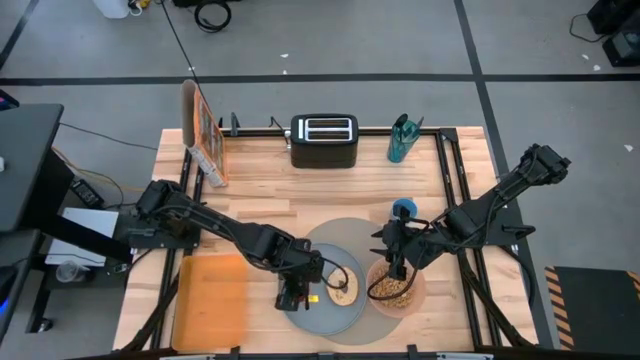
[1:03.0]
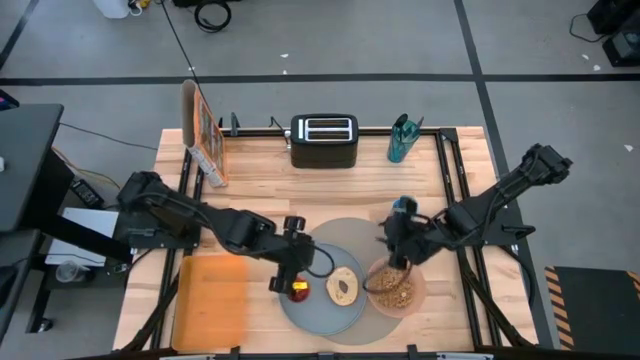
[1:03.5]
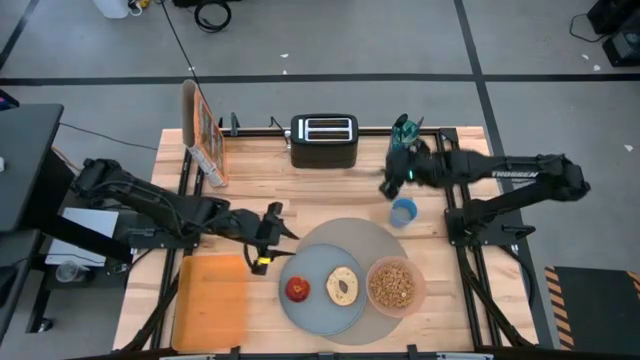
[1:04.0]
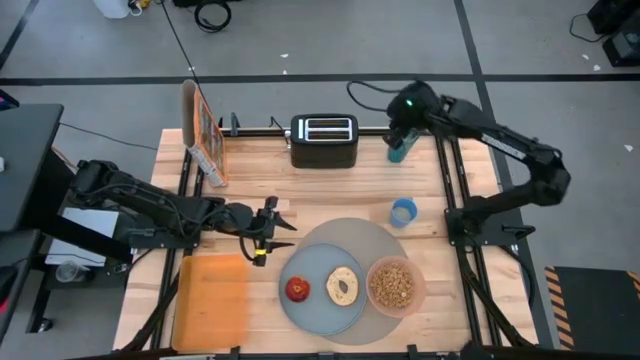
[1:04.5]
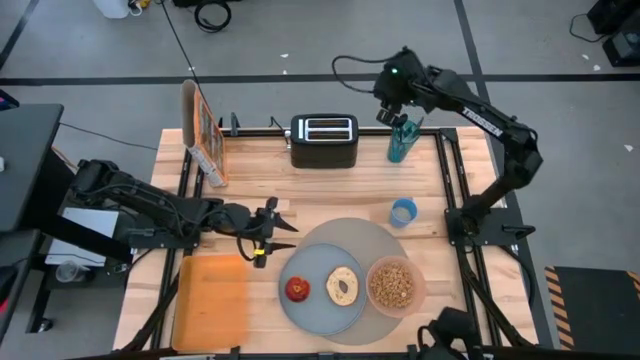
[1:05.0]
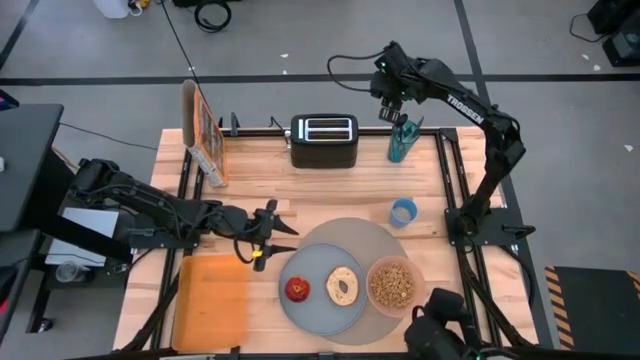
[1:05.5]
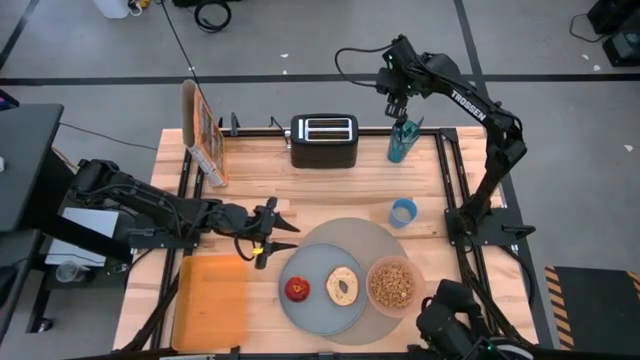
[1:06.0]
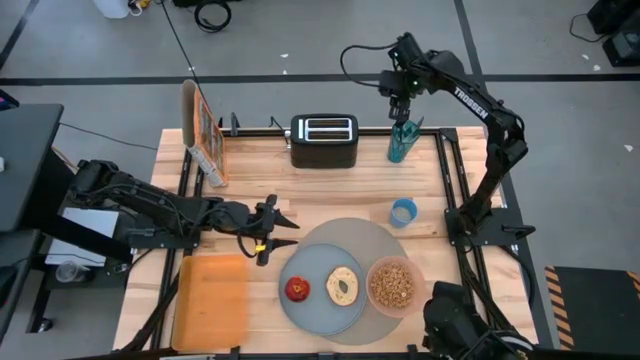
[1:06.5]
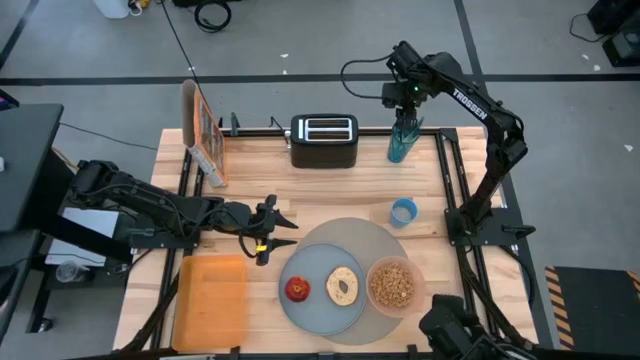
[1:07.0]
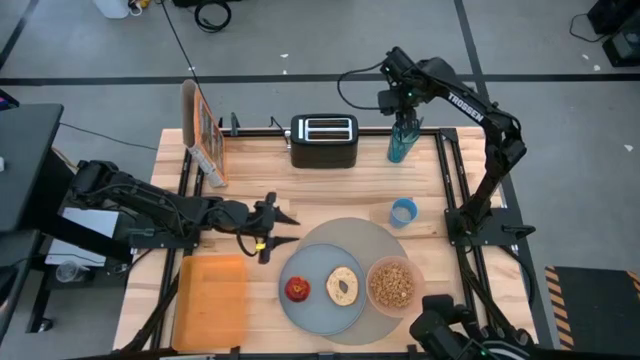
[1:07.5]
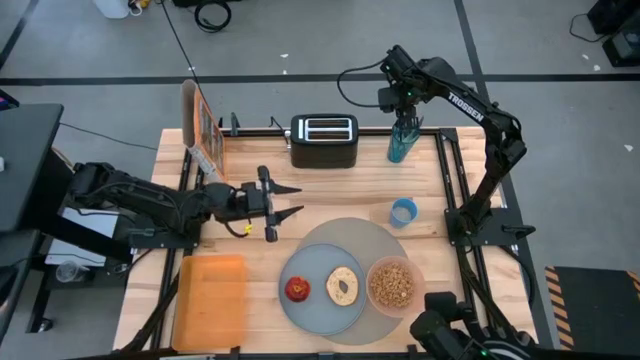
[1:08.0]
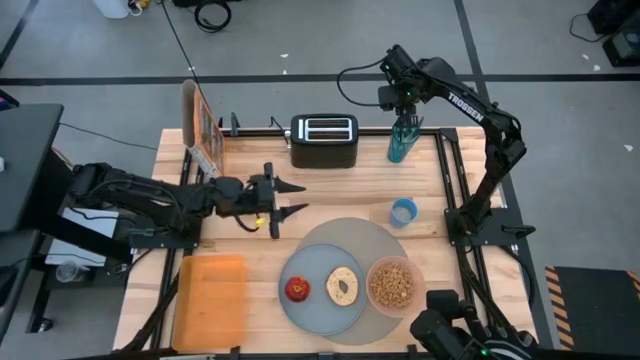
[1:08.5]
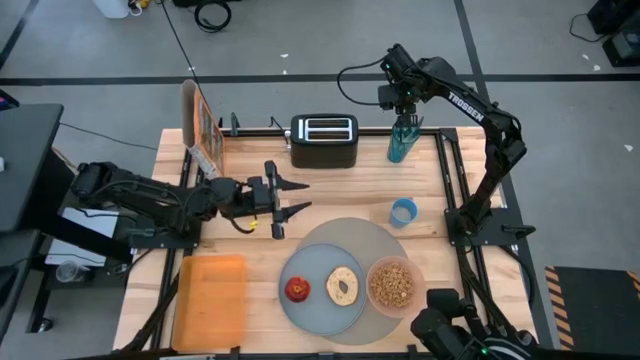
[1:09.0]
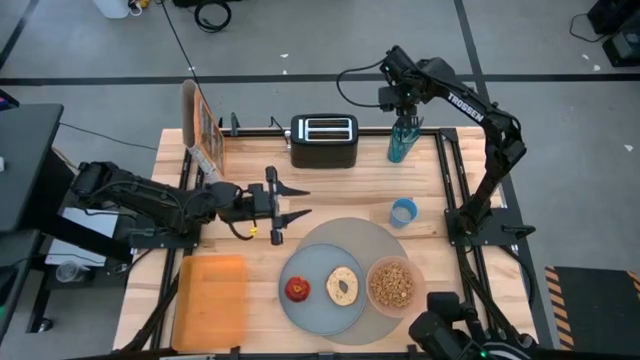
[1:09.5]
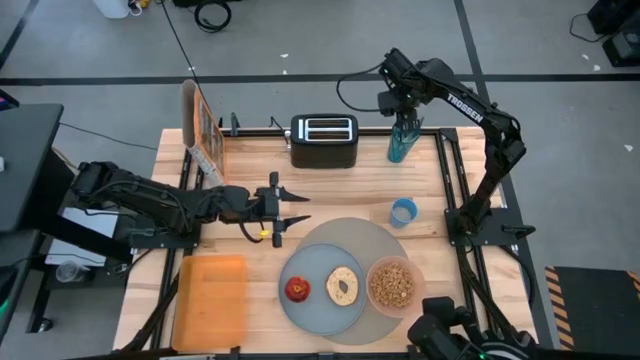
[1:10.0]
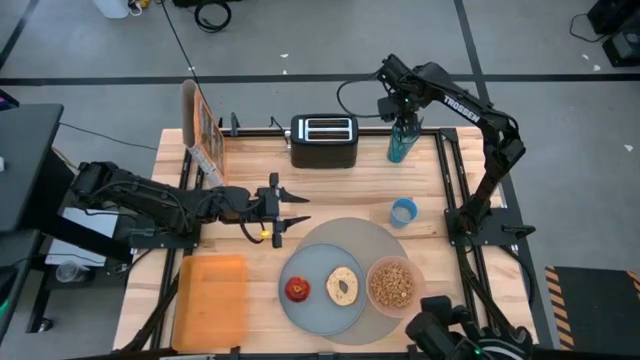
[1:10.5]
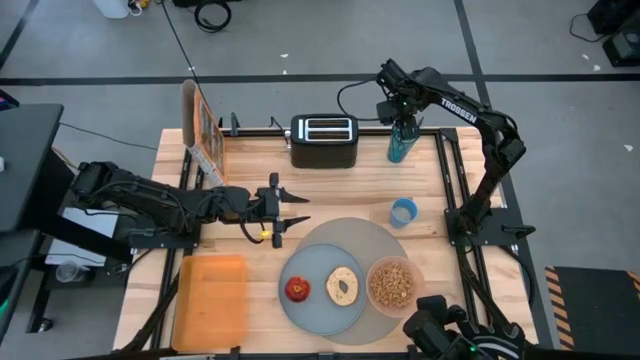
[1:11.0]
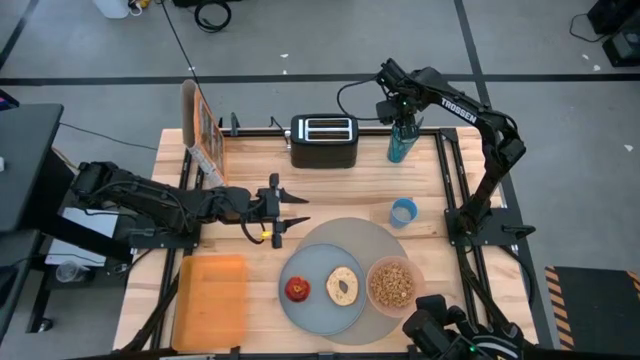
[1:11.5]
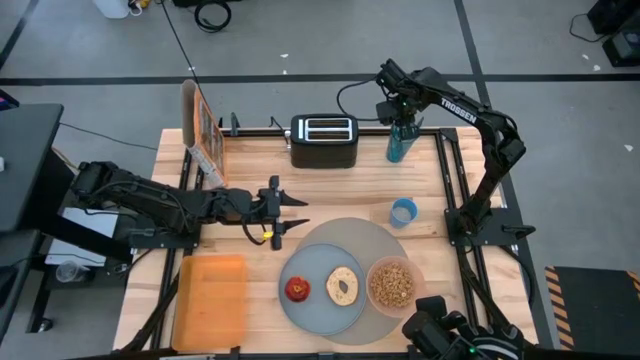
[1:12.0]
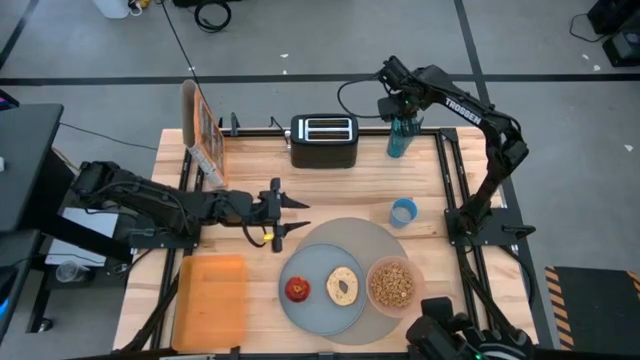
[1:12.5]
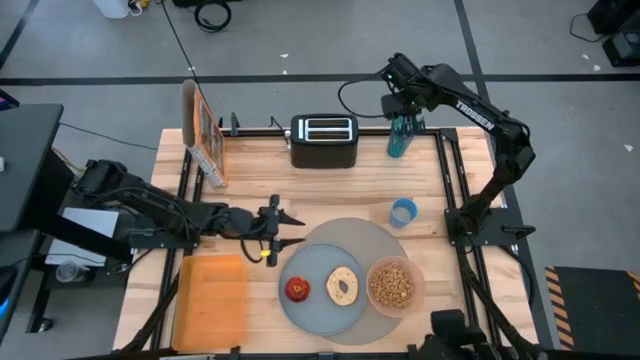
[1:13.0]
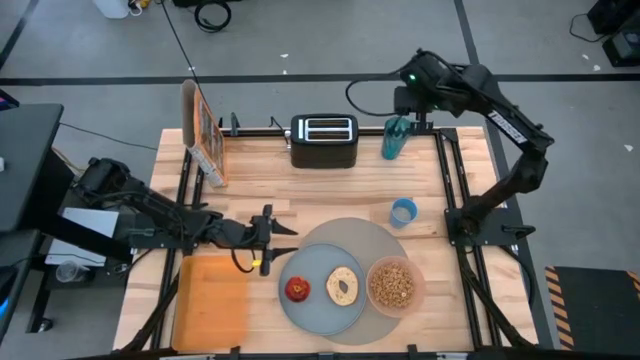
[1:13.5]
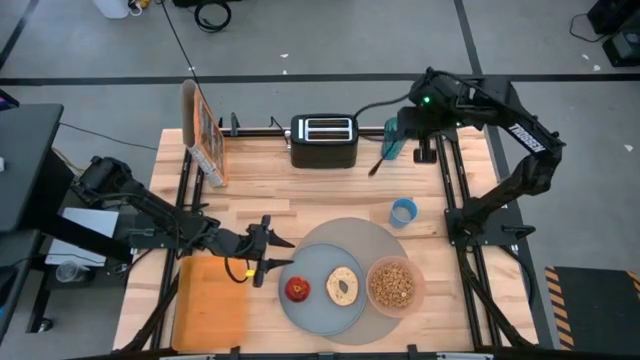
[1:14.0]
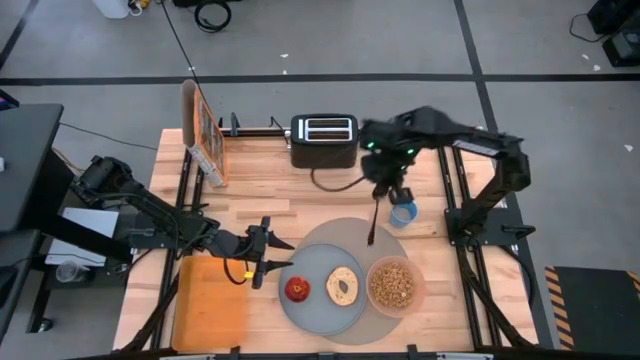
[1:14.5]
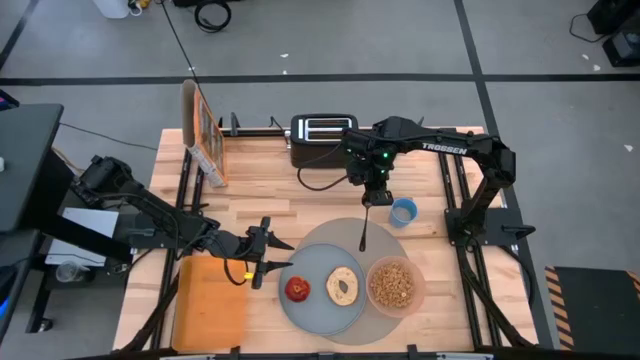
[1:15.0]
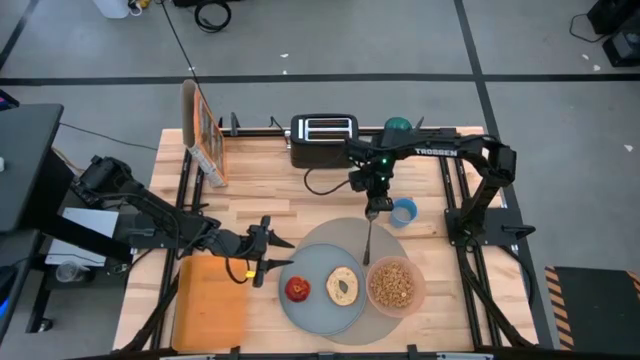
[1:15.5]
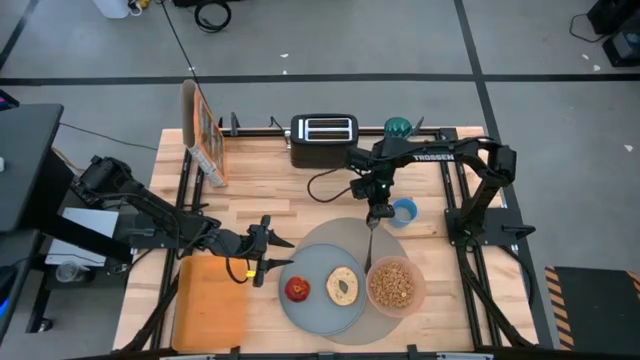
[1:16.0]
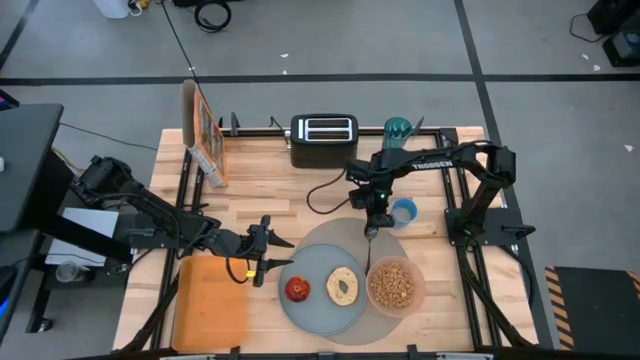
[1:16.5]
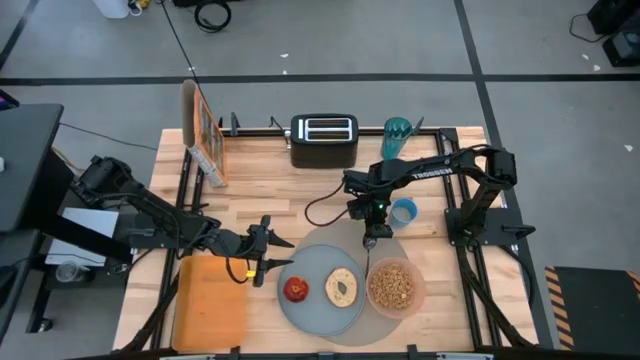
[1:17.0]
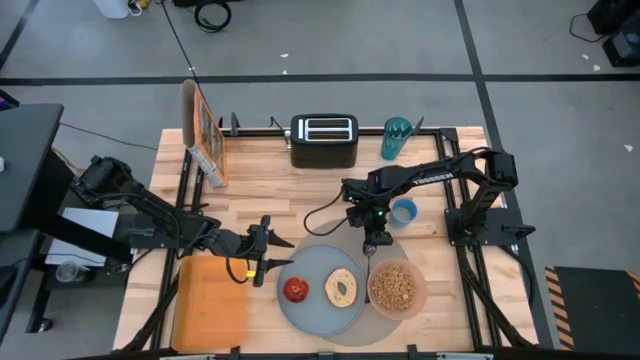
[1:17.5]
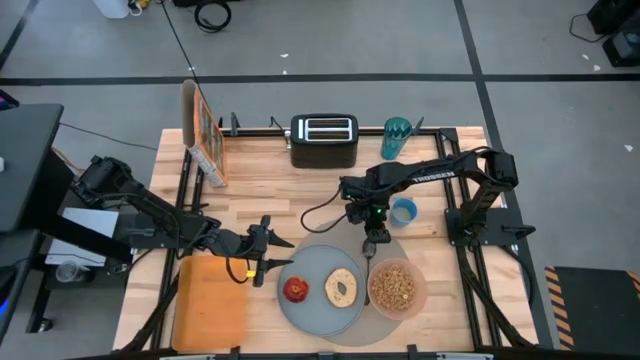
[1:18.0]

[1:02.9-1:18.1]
Task: Arrange a breakfast setting
Put the black spoon in the center of the blue plate and orange bowl on the placemat

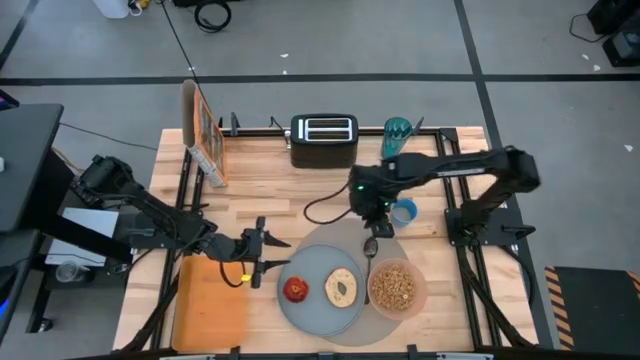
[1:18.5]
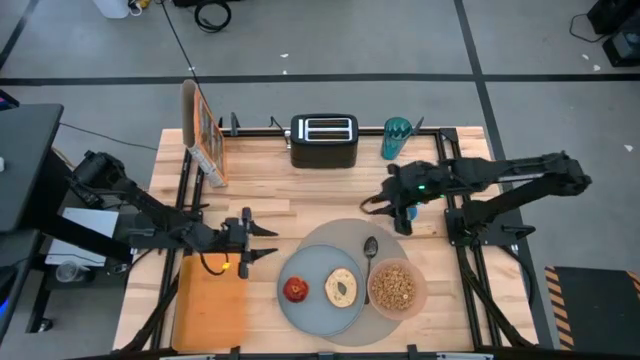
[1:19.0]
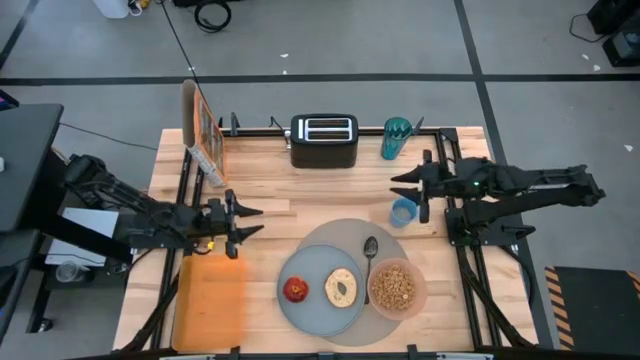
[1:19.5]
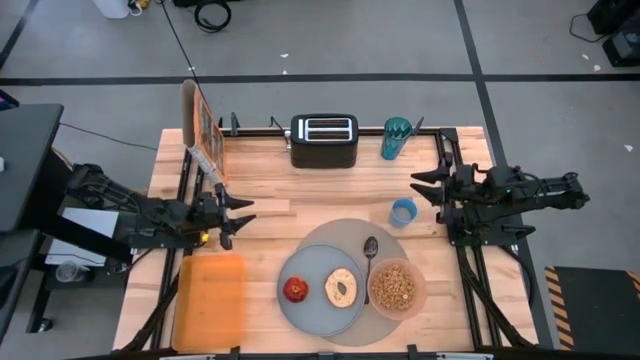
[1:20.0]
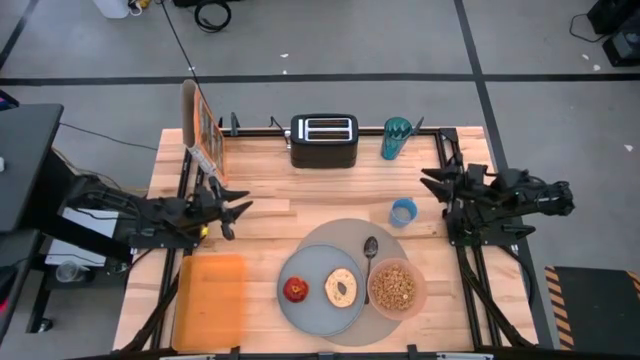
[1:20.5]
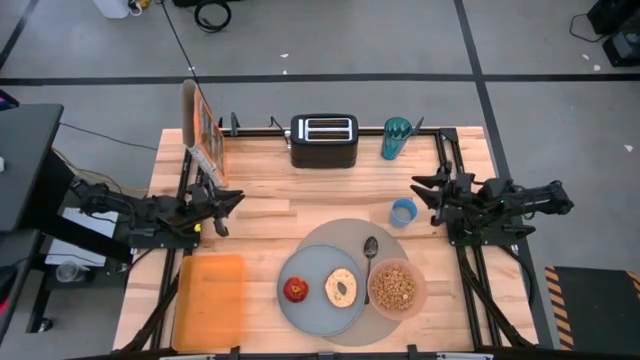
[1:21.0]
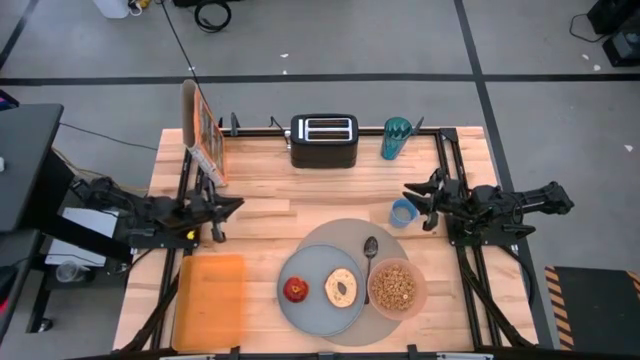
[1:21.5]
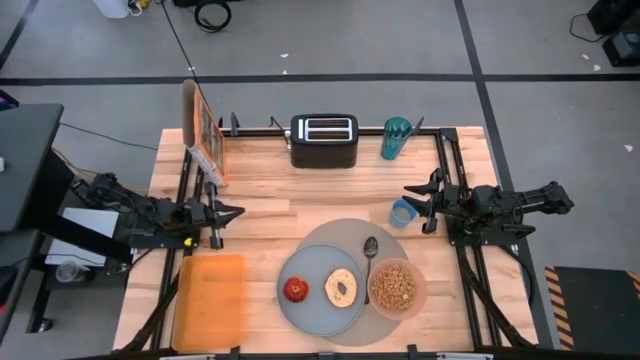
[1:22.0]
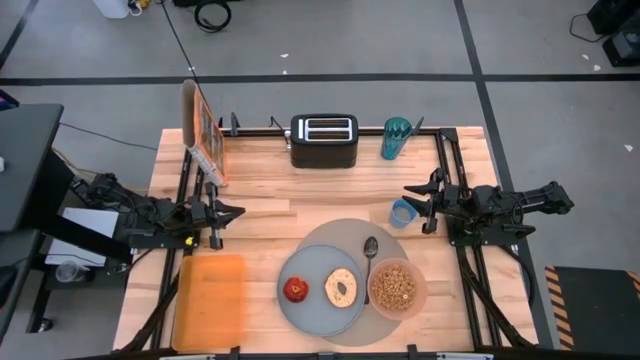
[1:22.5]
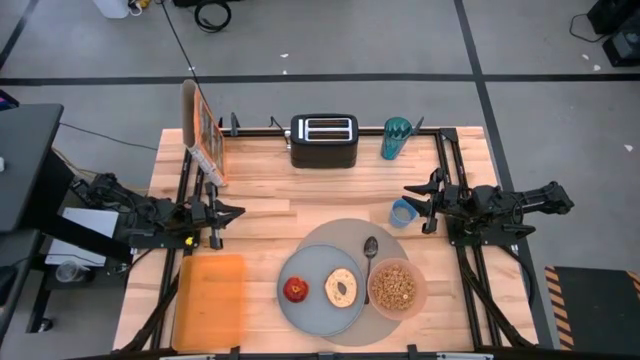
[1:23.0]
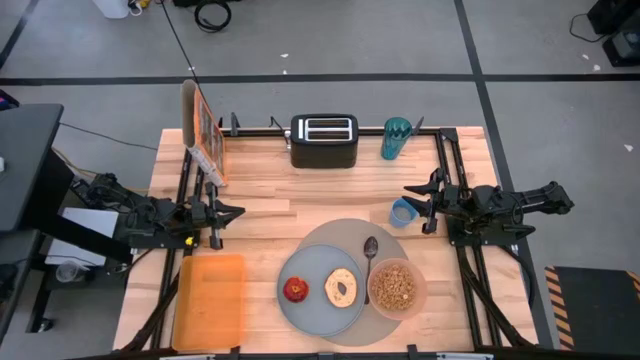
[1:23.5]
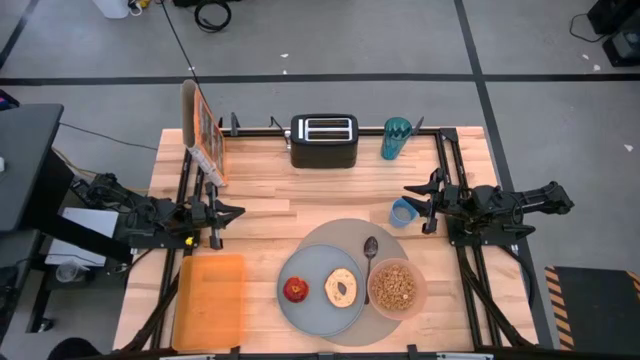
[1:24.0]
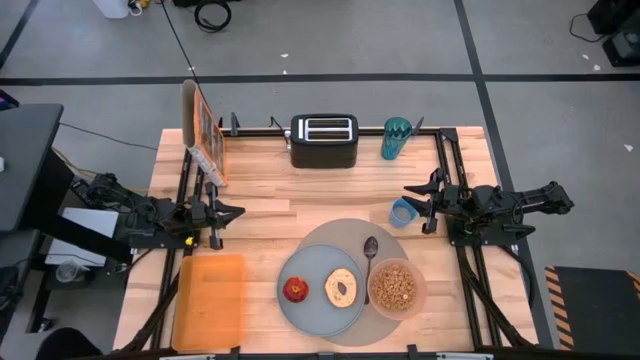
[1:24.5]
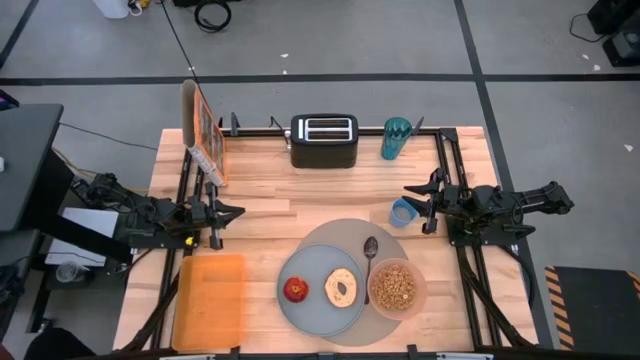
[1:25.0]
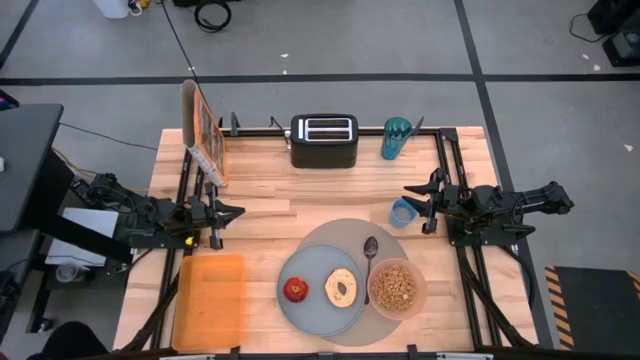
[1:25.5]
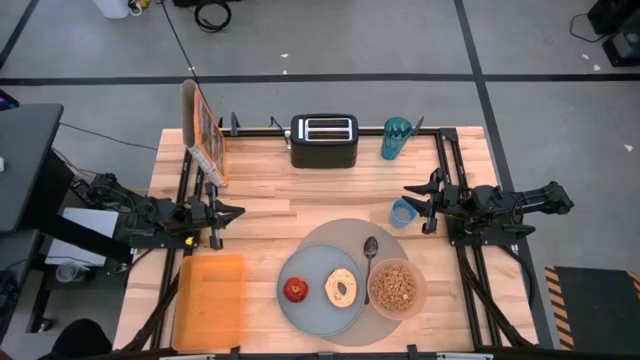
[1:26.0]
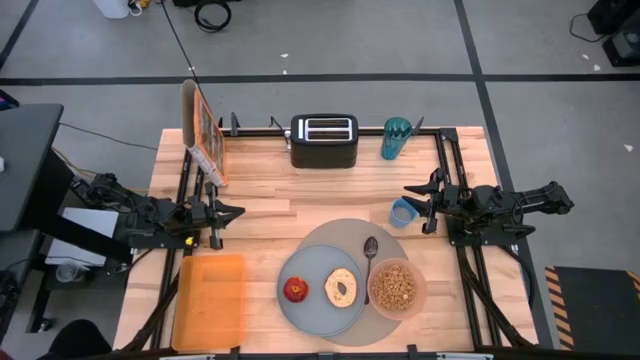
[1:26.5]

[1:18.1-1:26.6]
Return to Home Position
